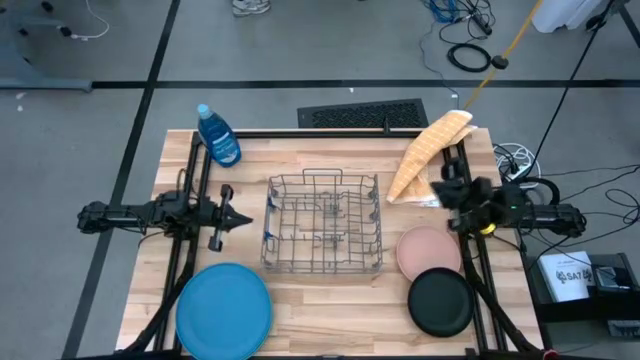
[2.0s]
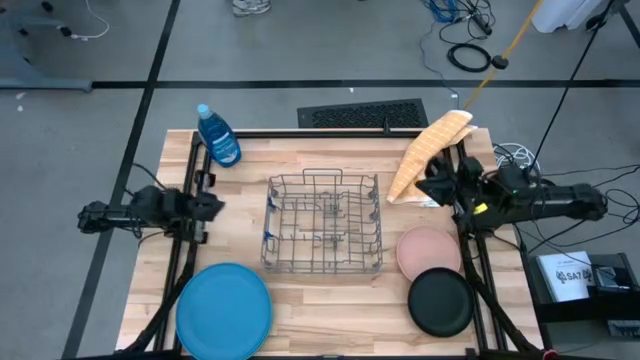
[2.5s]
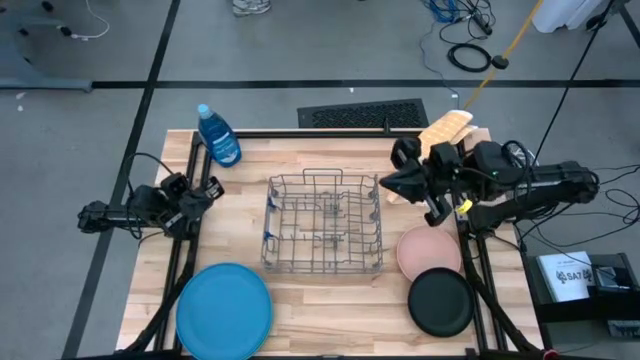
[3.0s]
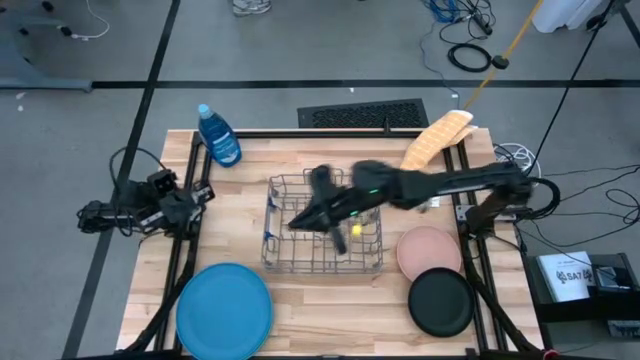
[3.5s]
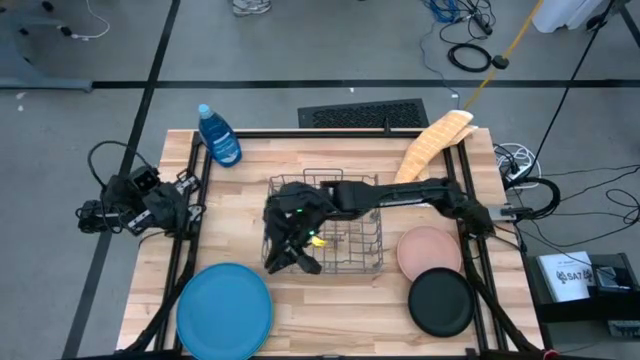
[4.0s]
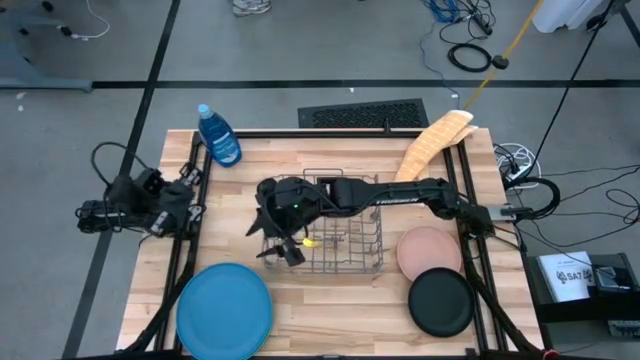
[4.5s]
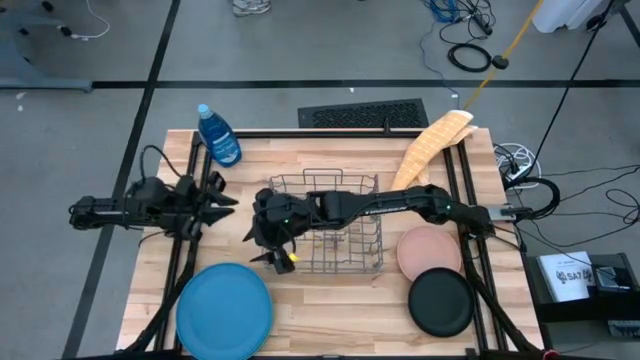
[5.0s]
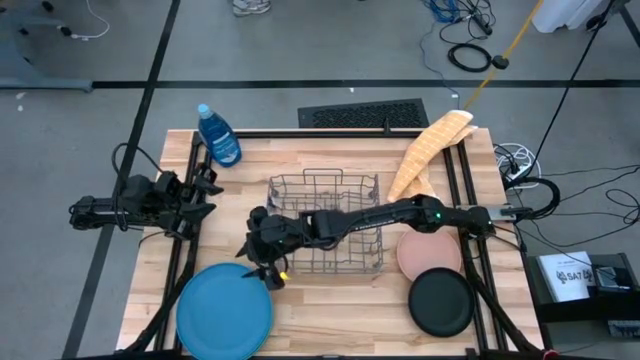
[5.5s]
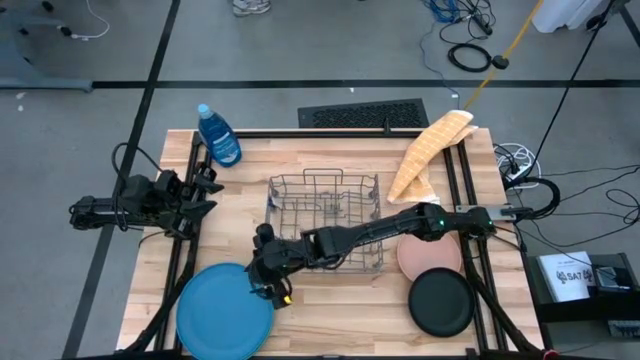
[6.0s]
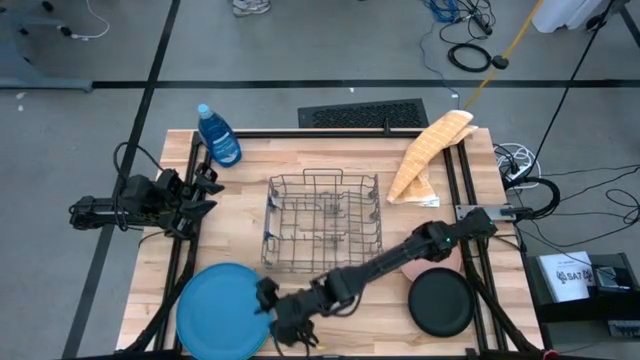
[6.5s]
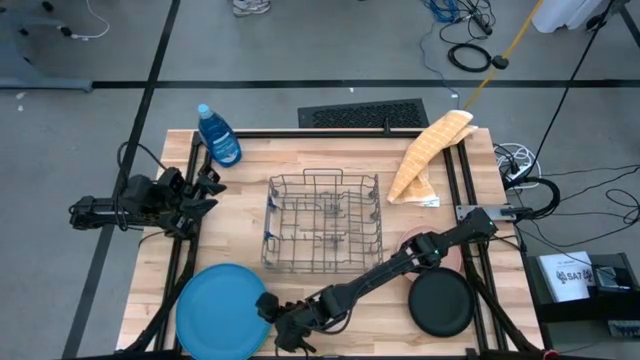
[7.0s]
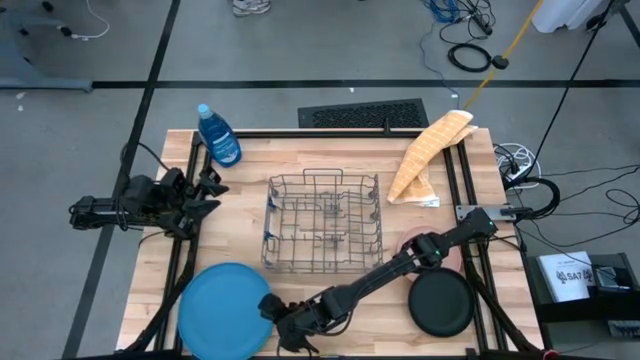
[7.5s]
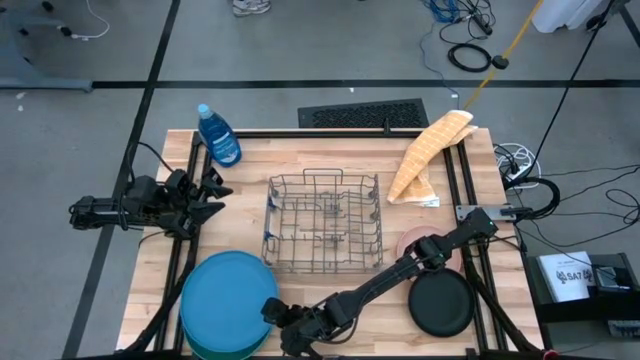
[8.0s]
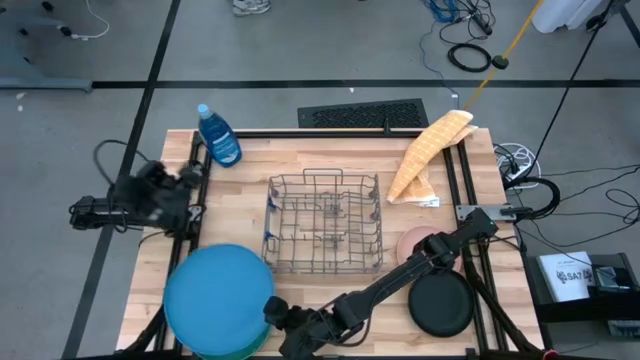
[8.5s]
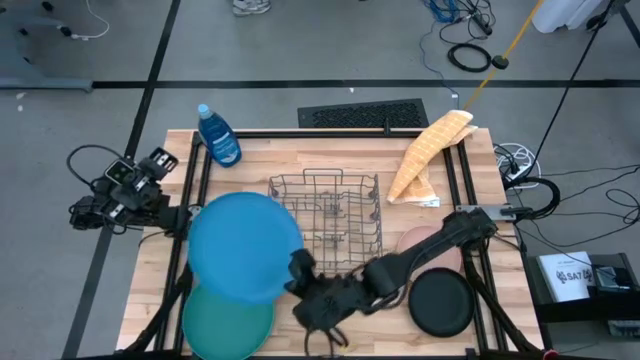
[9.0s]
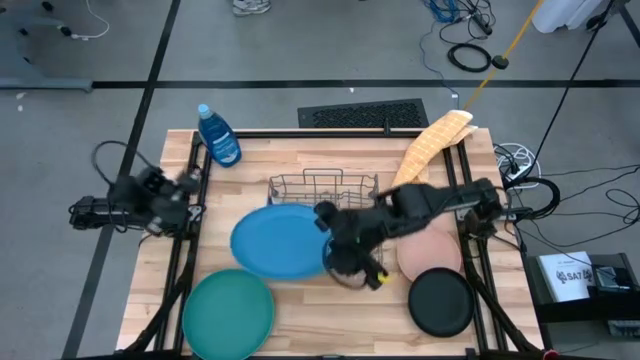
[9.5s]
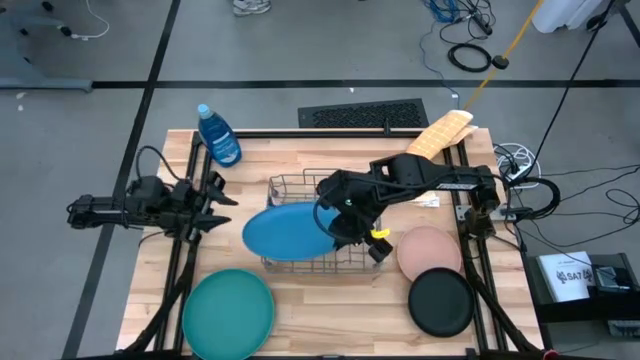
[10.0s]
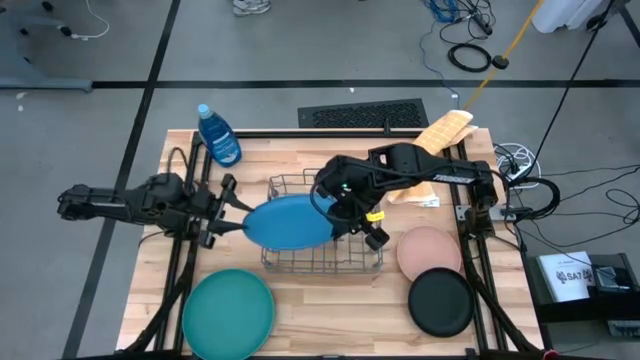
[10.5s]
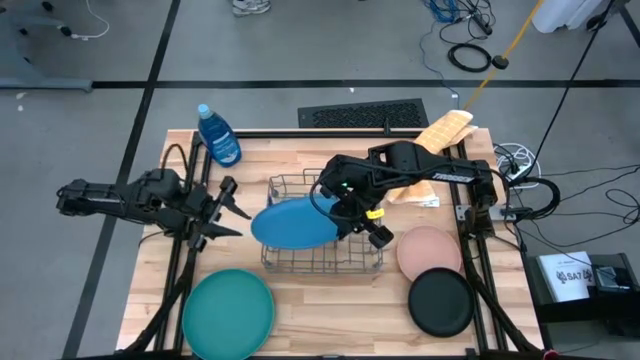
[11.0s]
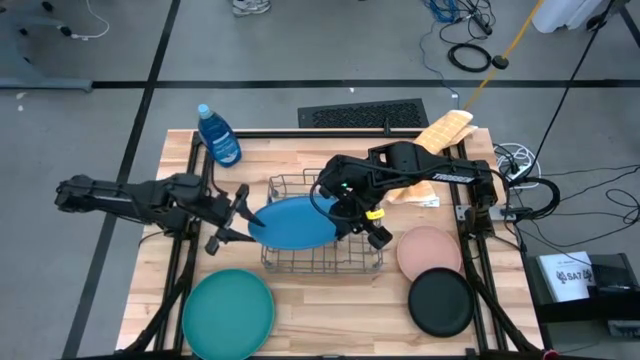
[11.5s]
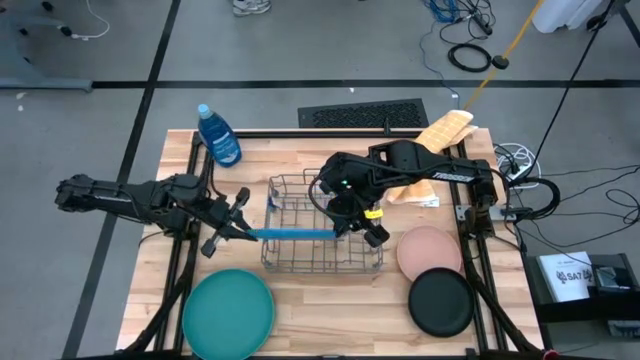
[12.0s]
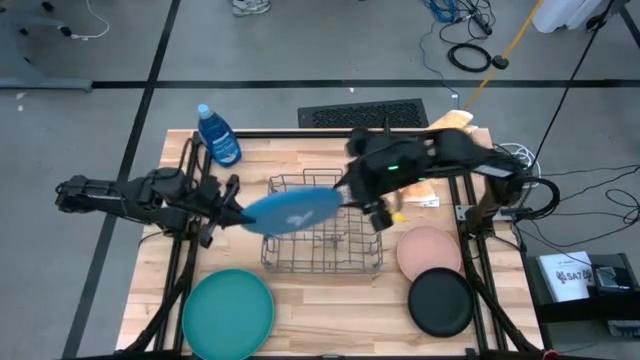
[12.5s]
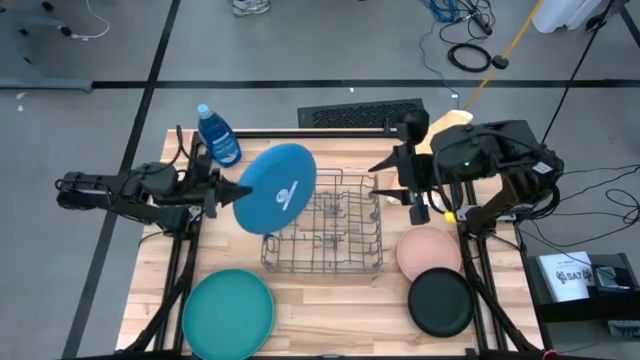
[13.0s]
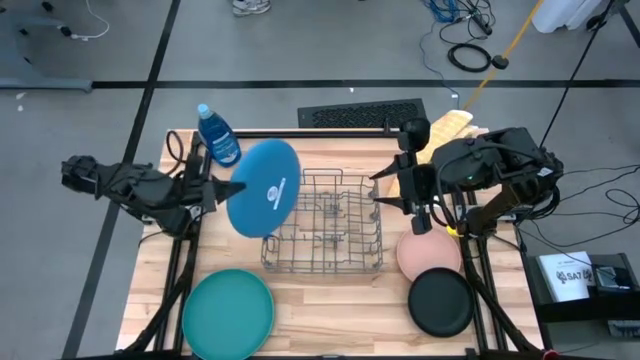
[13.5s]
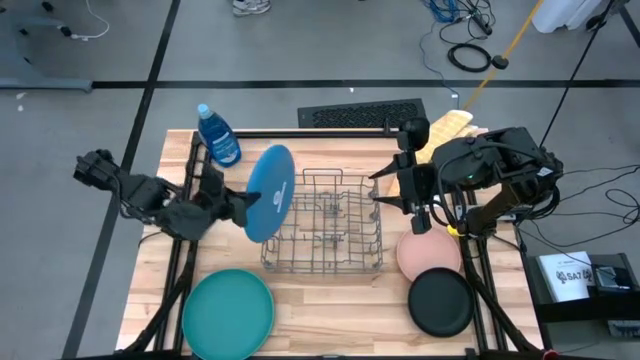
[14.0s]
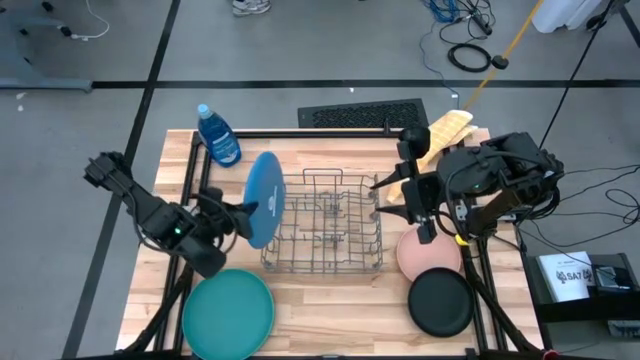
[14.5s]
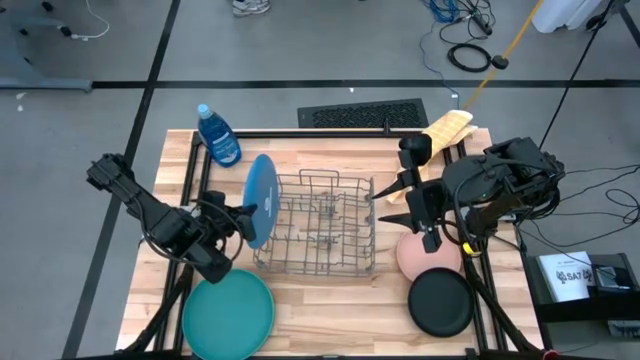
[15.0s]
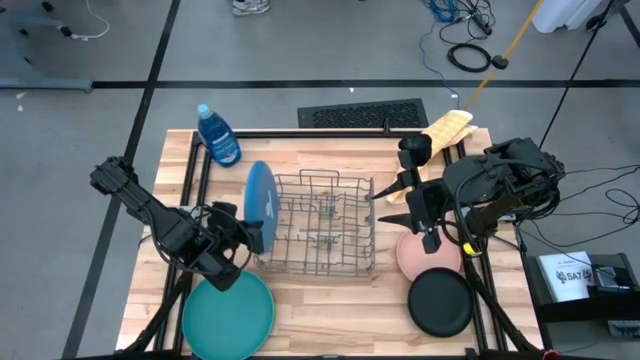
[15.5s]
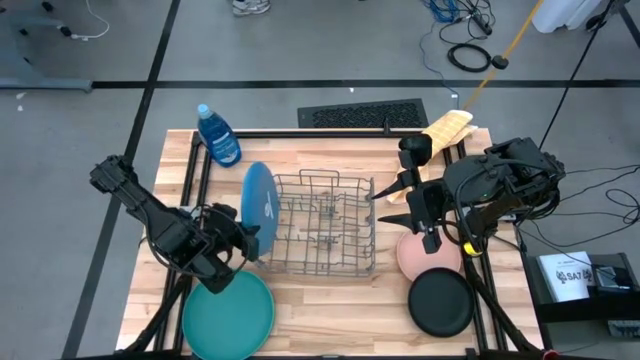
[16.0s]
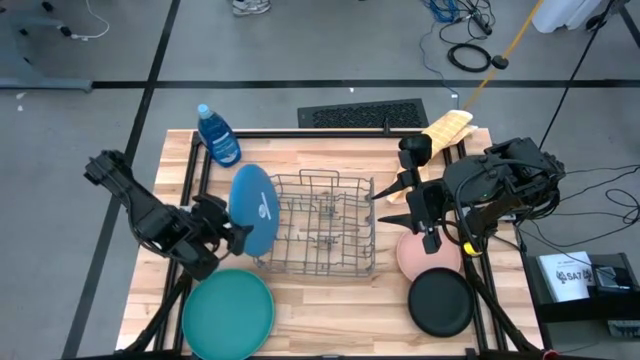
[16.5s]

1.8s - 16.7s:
Task: Sort dishes
Put the blue plate into the dish rack

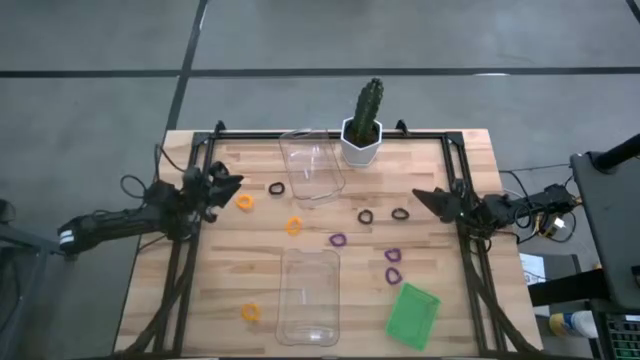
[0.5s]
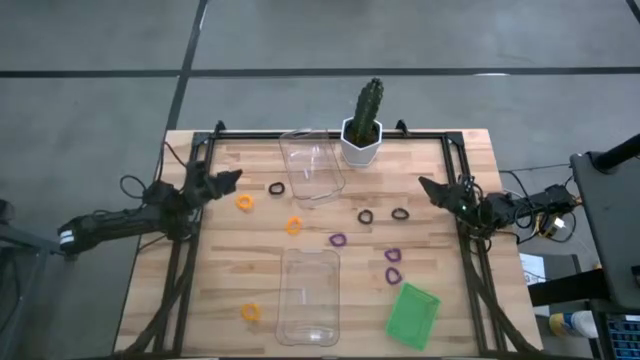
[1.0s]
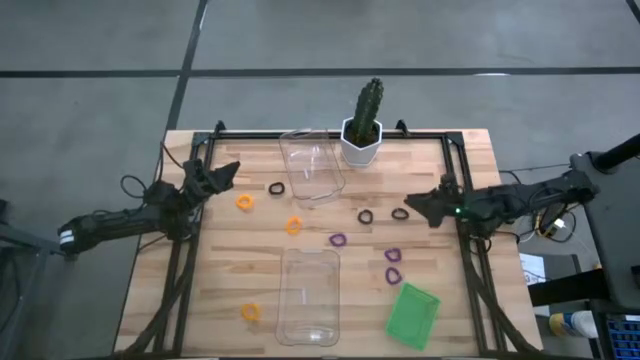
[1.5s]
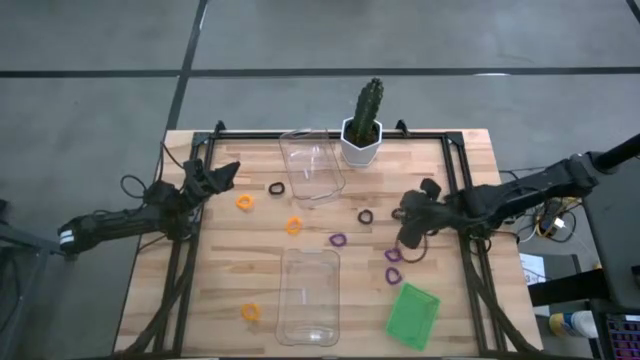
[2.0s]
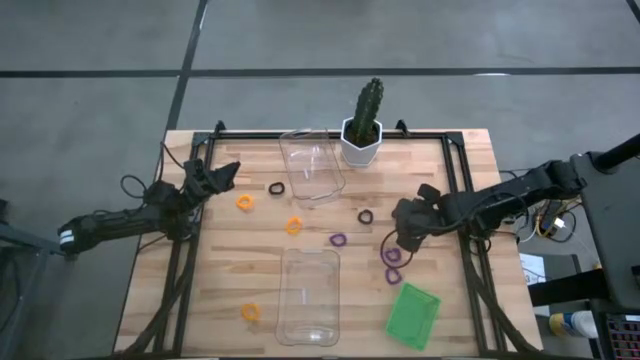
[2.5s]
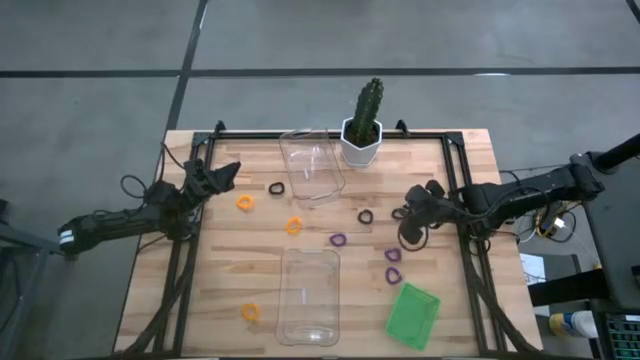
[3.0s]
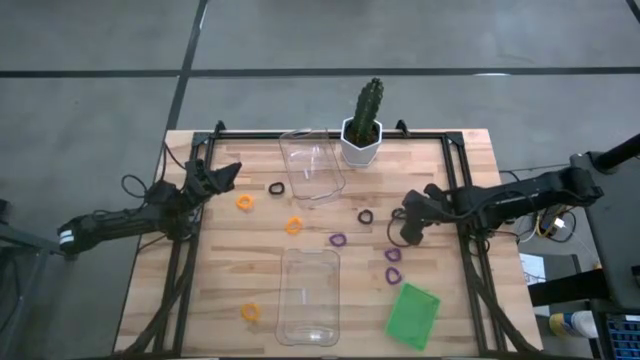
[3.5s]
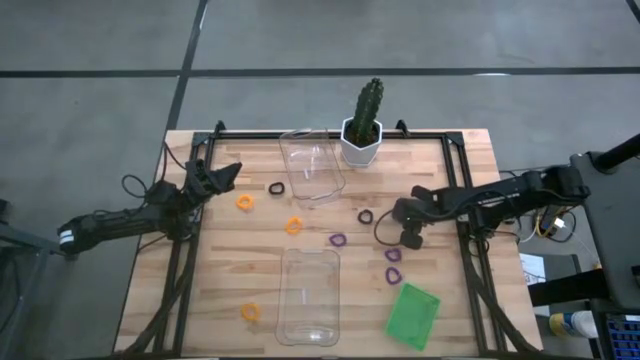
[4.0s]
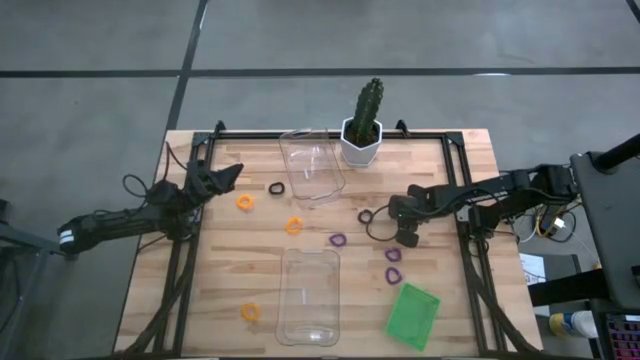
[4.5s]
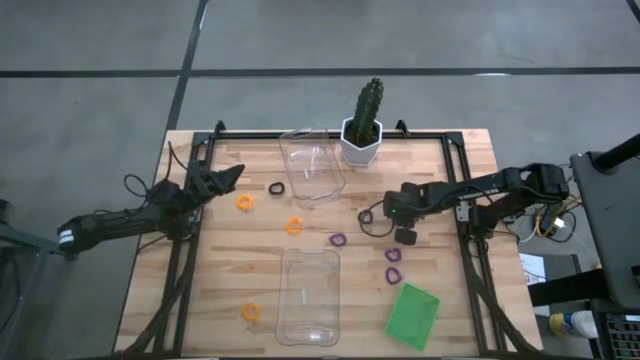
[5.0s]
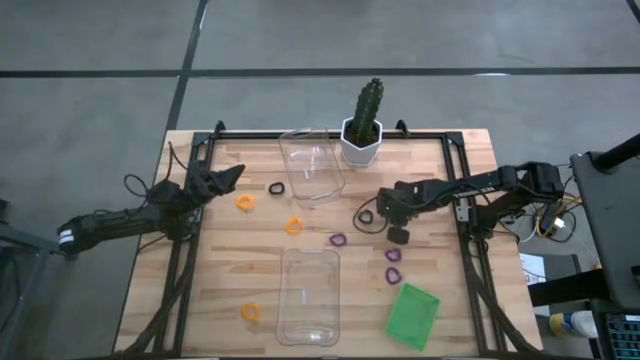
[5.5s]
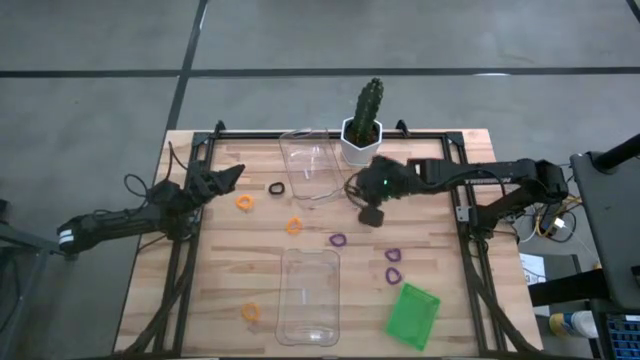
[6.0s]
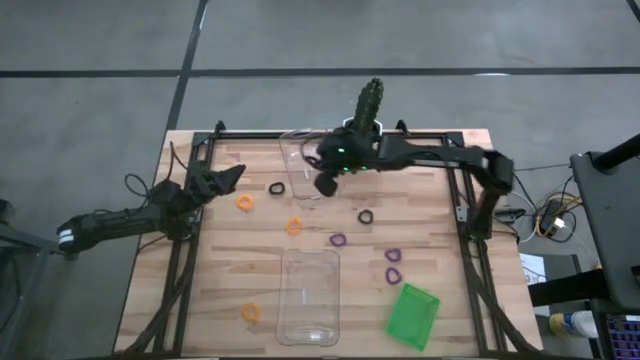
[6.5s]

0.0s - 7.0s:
Task: Sort spring keychains
Put the right black spring keychain into the top transparent bin
